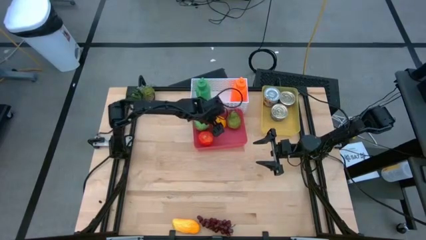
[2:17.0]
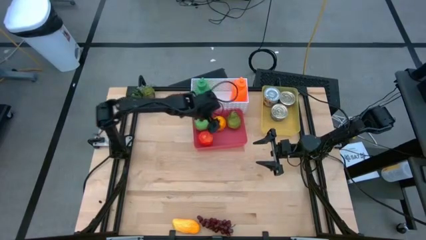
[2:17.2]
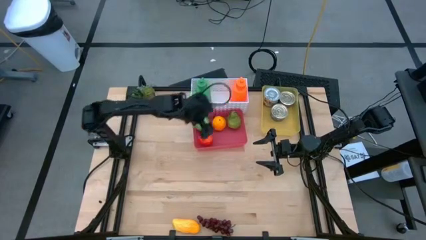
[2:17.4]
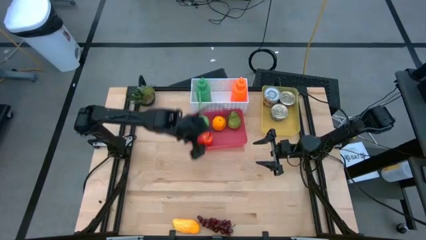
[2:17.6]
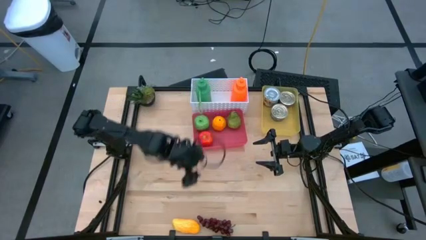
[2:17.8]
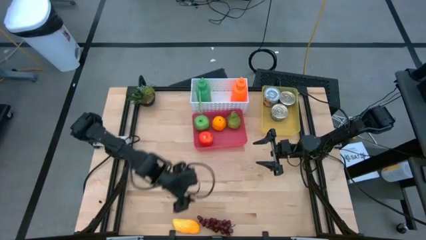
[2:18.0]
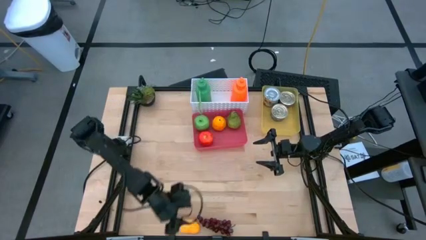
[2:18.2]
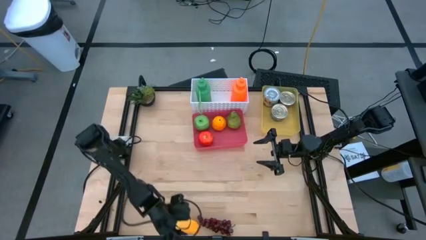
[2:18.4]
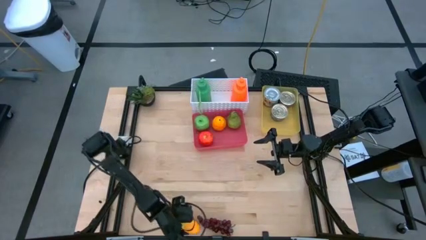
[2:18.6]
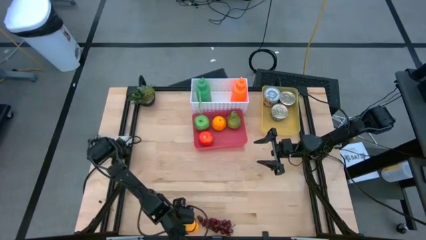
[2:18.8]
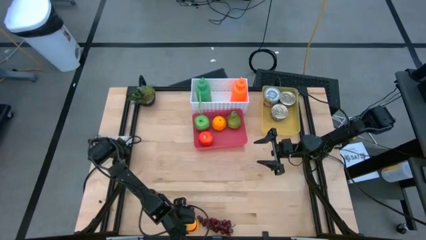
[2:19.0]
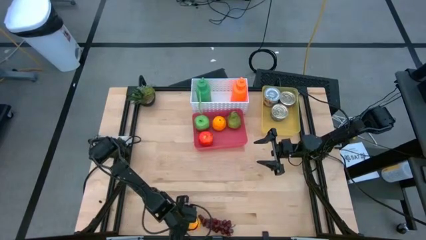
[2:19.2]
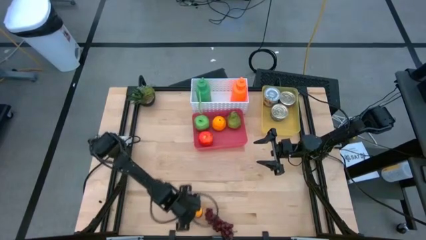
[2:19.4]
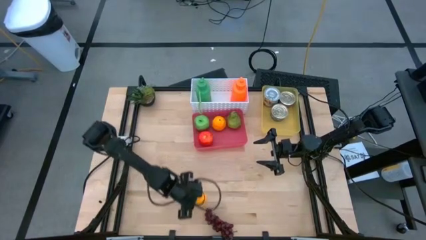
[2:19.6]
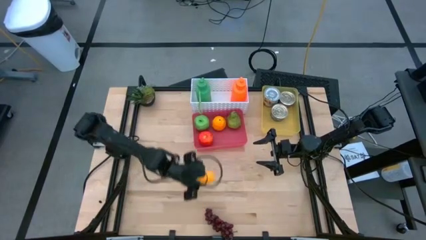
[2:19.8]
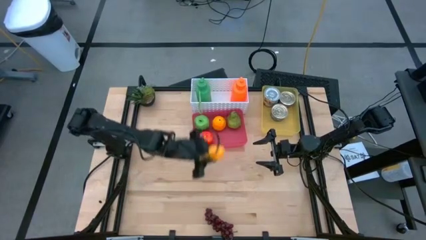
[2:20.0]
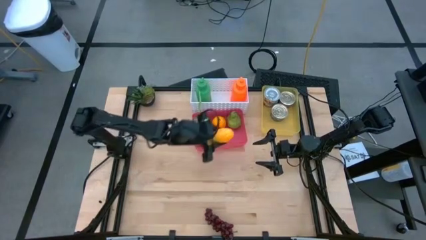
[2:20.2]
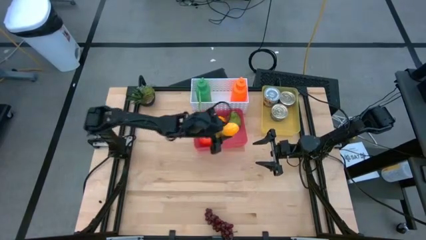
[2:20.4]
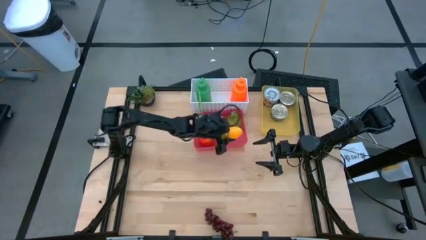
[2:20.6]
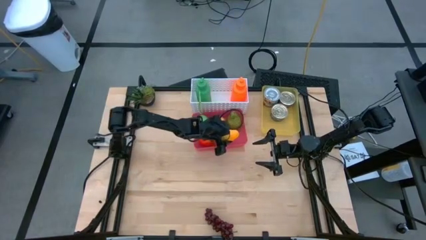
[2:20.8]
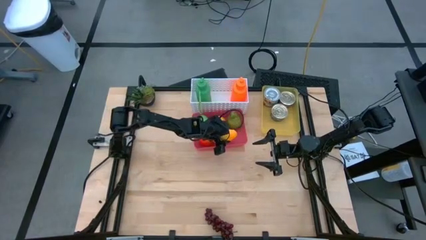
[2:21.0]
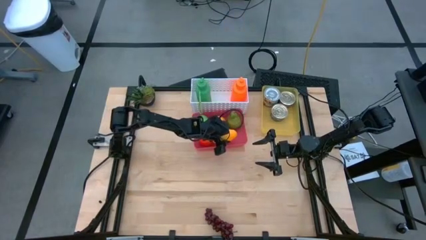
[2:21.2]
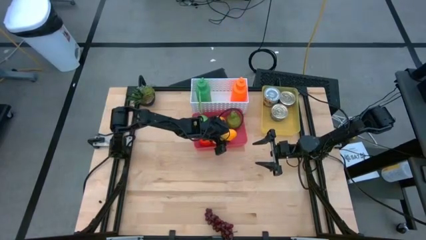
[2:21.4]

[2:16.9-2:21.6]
Task: Pick & Place Food Item
Put the yellow mango into the red bin

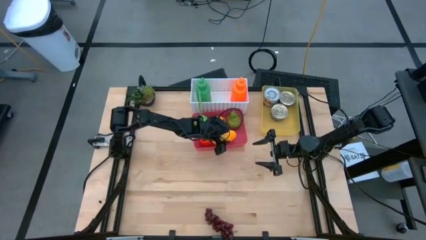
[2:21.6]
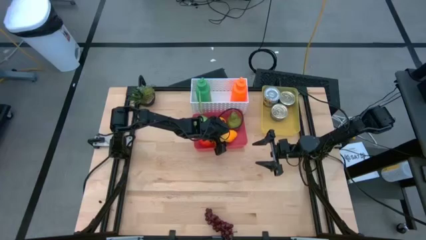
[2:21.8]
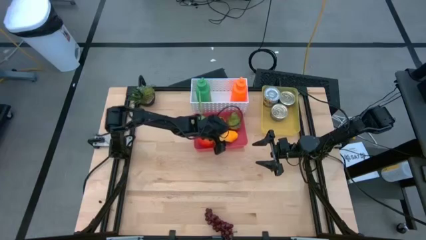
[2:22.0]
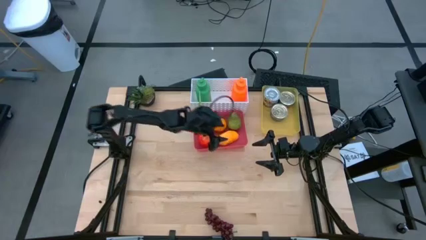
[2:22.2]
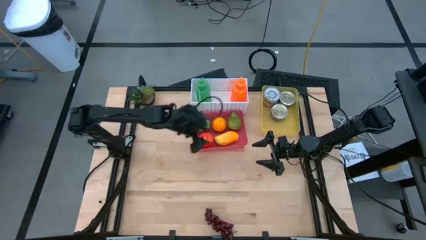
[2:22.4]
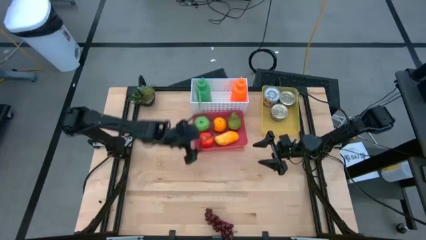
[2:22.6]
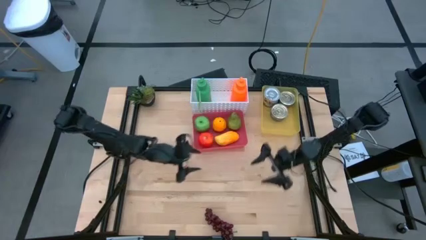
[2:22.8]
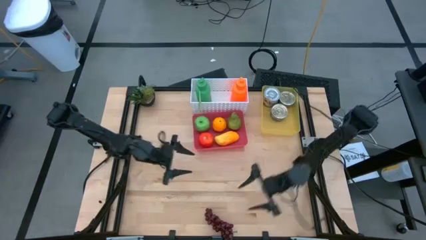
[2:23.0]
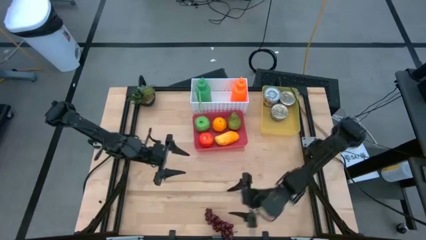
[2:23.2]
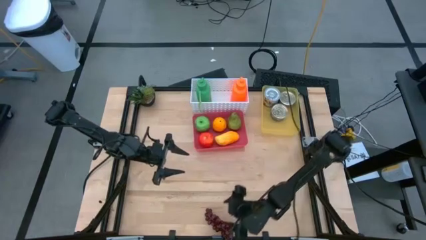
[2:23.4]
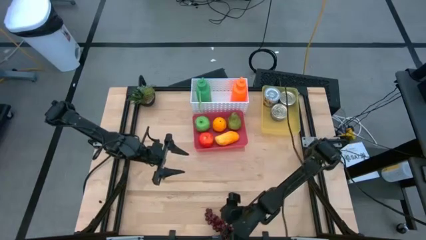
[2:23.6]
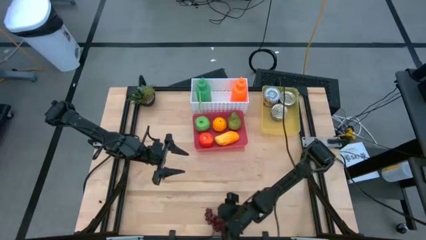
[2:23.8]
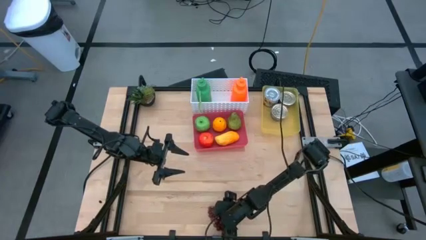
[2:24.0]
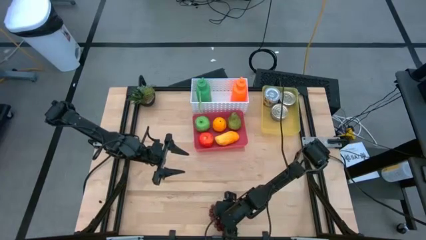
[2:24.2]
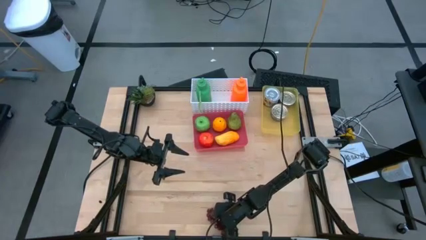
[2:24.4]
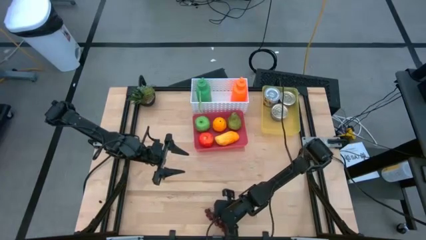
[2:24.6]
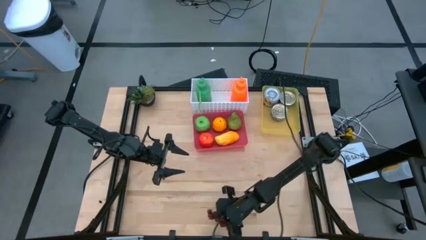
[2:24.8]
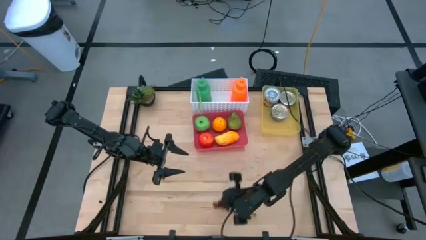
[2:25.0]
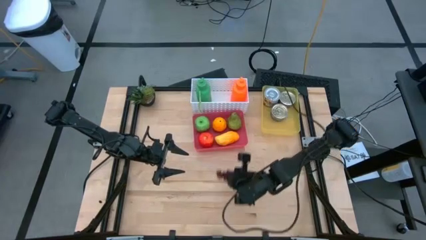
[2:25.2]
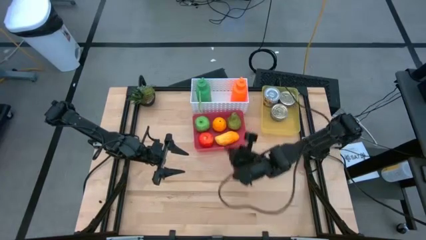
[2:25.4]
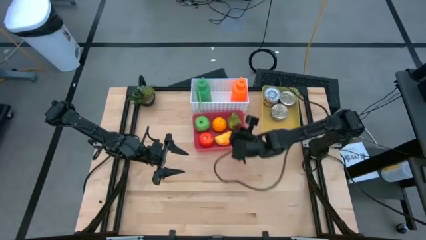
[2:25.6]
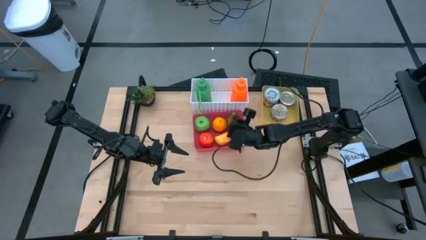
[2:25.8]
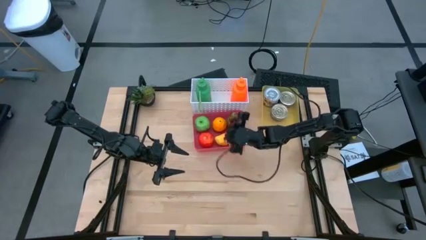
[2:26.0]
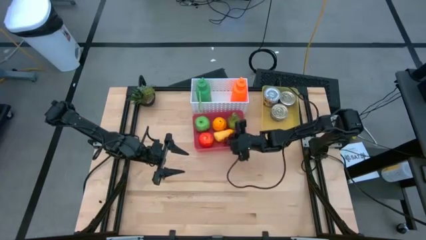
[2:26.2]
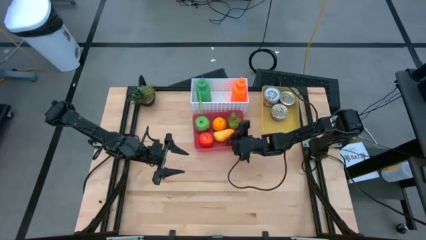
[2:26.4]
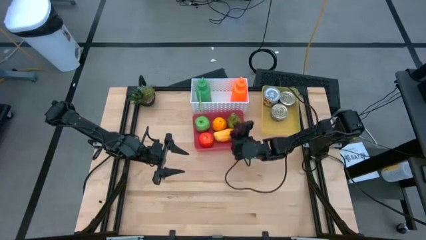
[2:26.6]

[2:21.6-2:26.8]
Put the red grapes into the red bin

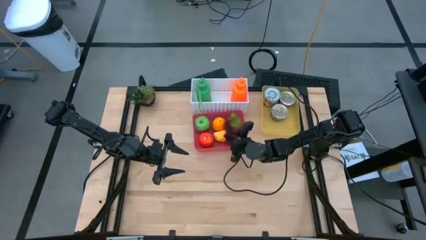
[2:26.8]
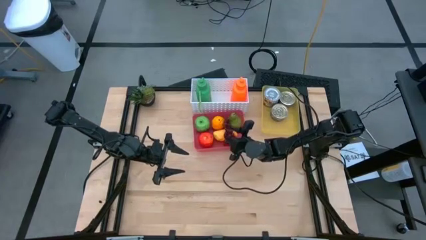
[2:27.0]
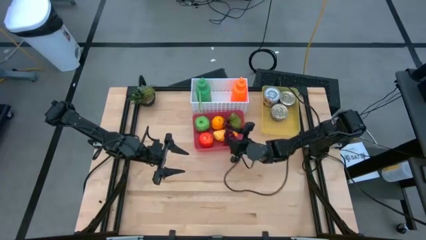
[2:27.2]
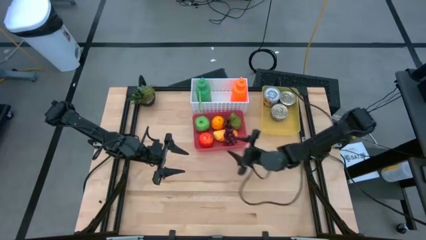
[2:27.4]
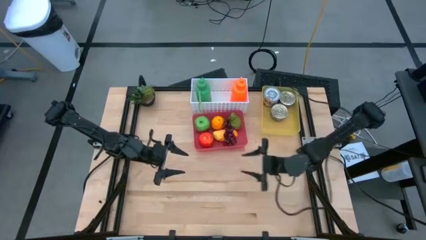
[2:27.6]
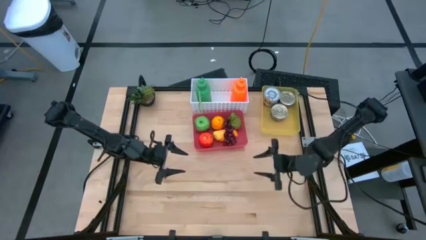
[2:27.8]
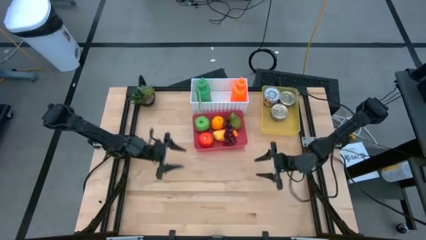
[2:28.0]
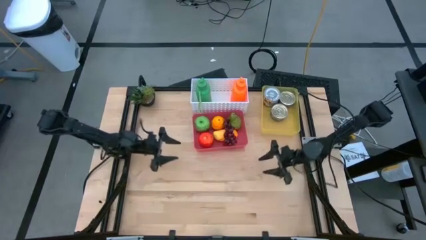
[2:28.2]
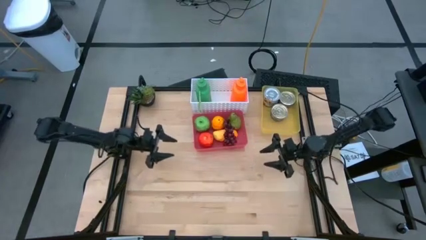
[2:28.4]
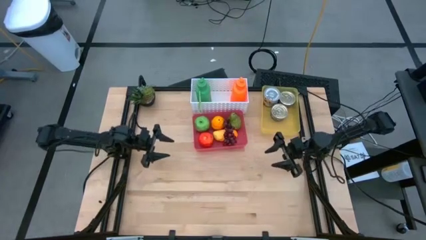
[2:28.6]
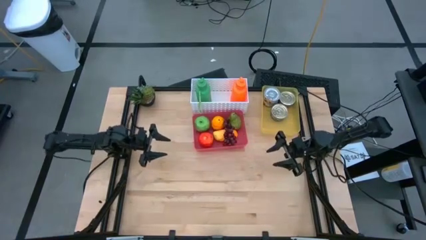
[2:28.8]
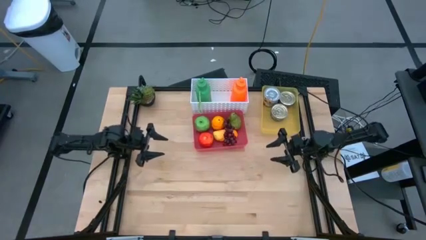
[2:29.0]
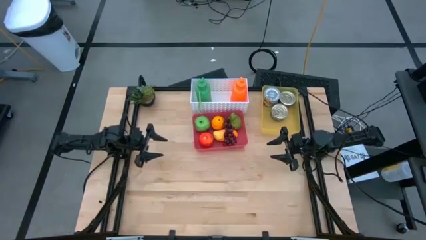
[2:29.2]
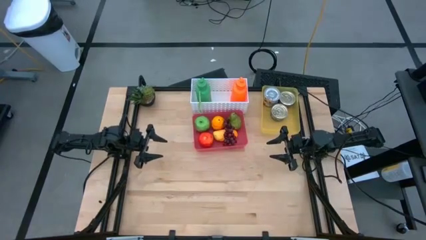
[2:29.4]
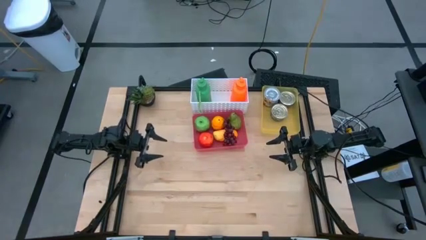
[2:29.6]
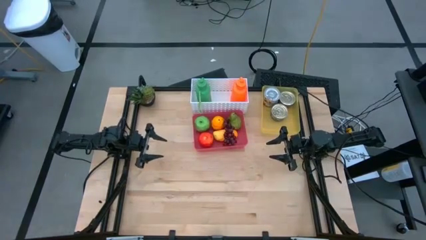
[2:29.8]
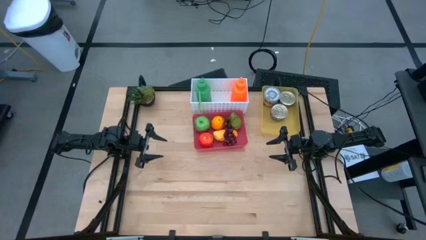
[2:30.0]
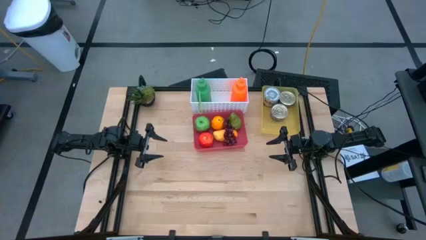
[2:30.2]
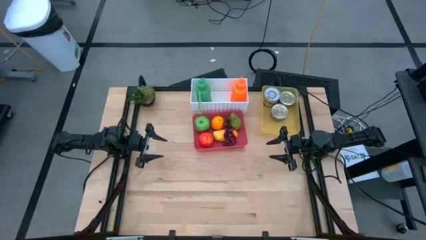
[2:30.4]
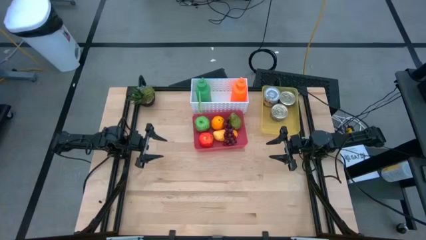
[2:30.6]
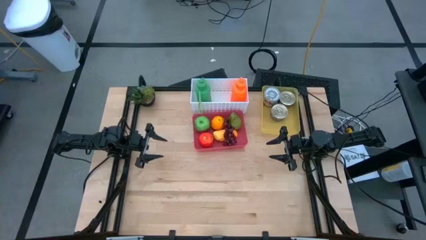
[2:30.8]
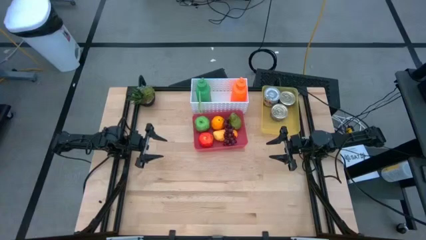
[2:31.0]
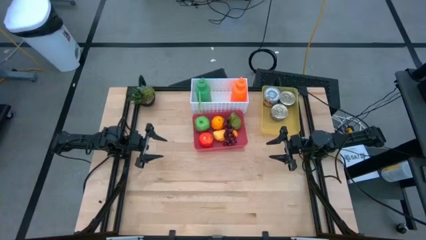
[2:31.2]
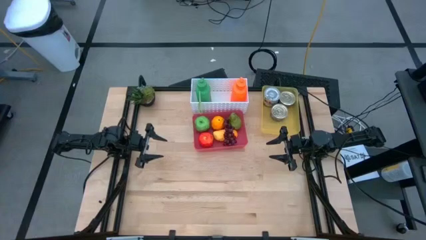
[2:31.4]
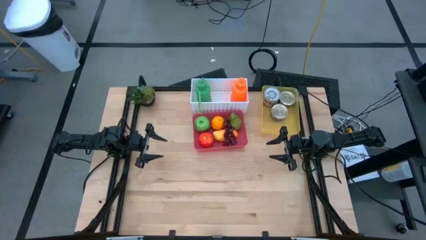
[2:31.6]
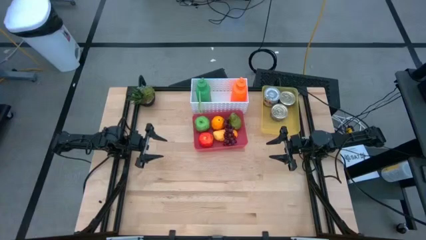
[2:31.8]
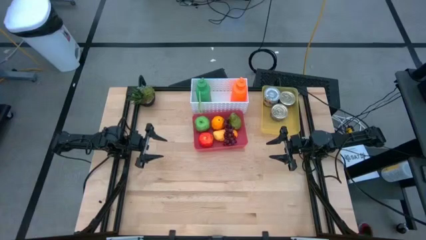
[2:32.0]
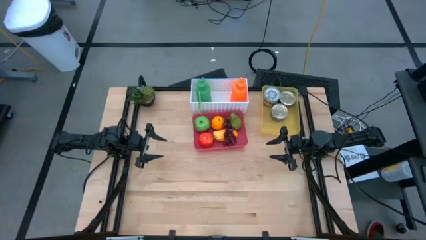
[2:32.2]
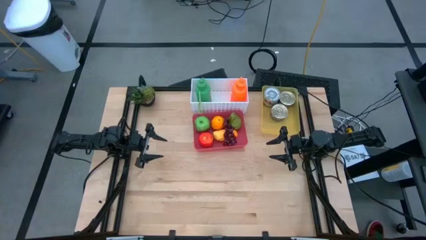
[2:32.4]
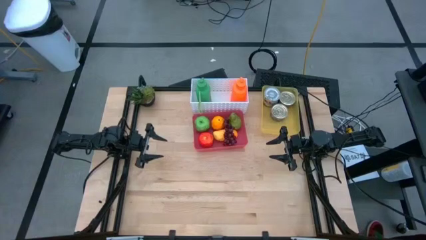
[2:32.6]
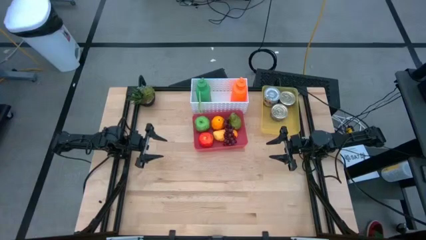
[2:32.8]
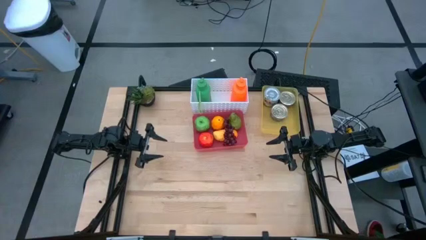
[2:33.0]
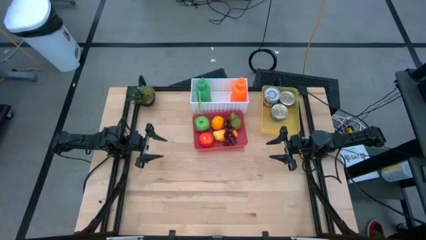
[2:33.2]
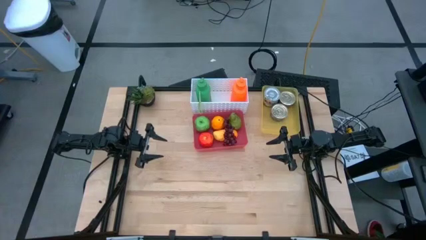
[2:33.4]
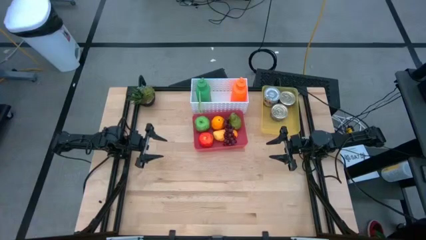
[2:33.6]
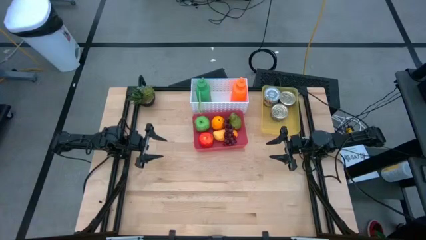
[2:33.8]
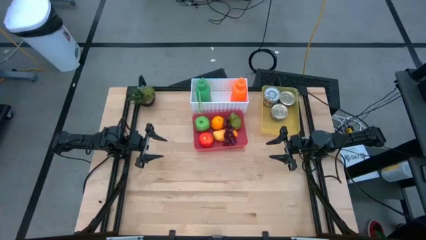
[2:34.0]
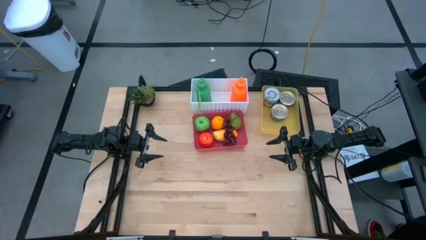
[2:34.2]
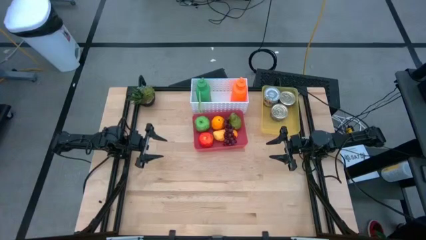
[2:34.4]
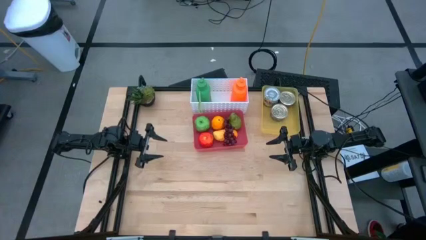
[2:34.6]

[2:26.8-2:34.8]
Return to Home Position
